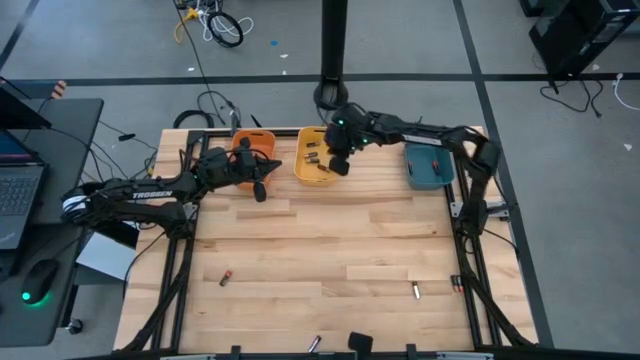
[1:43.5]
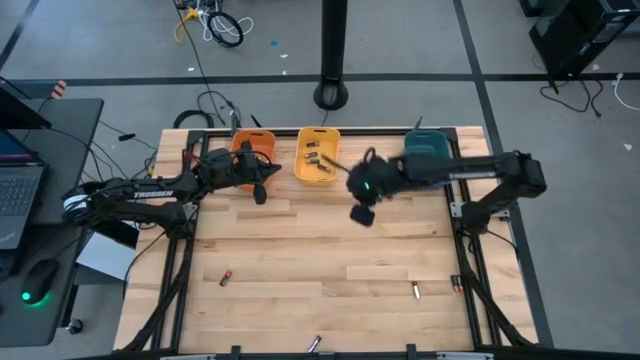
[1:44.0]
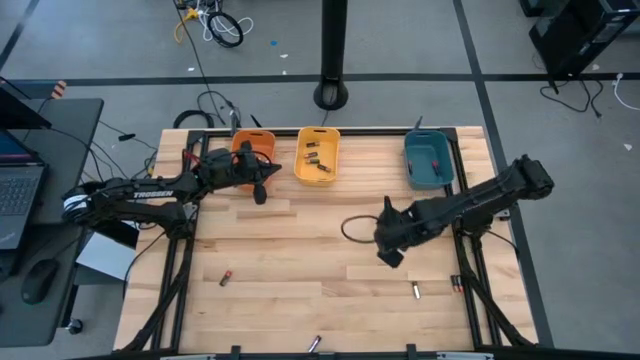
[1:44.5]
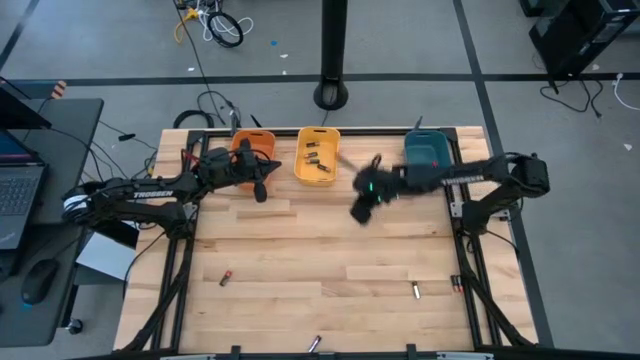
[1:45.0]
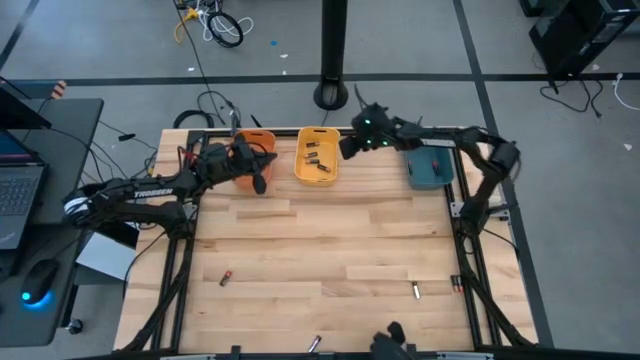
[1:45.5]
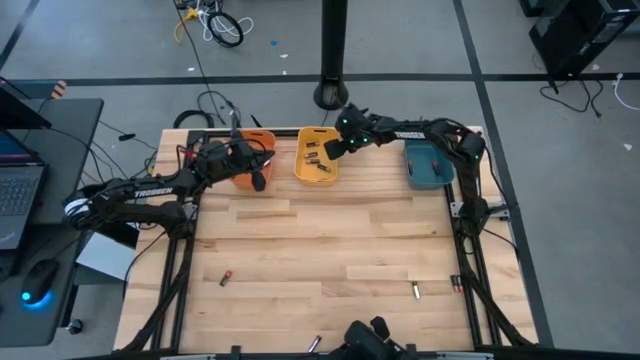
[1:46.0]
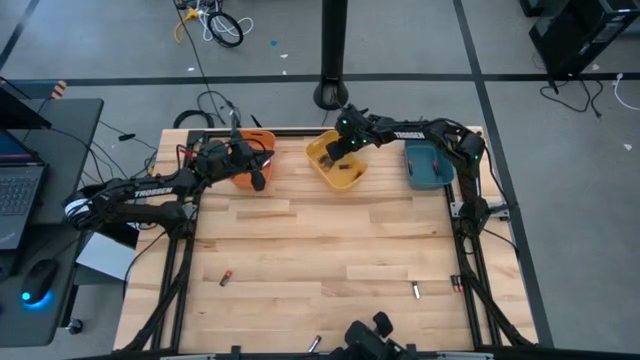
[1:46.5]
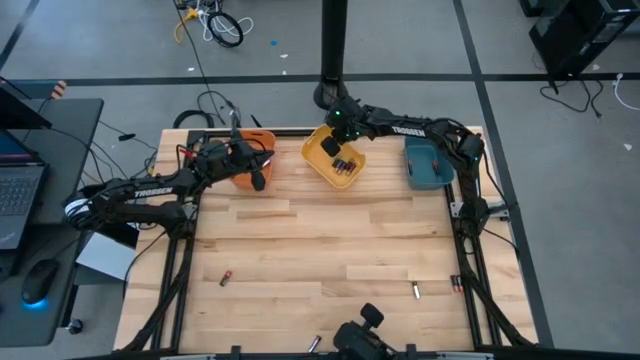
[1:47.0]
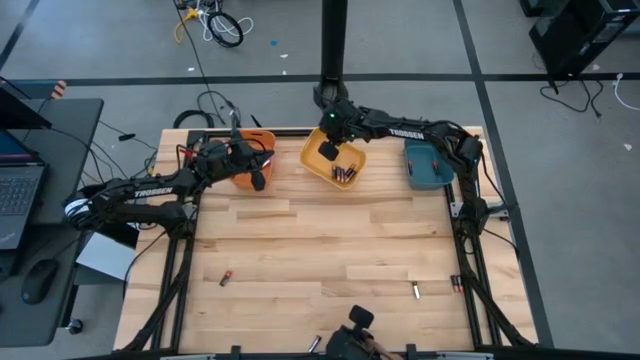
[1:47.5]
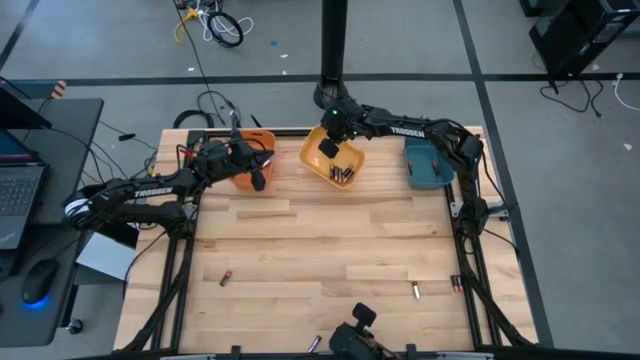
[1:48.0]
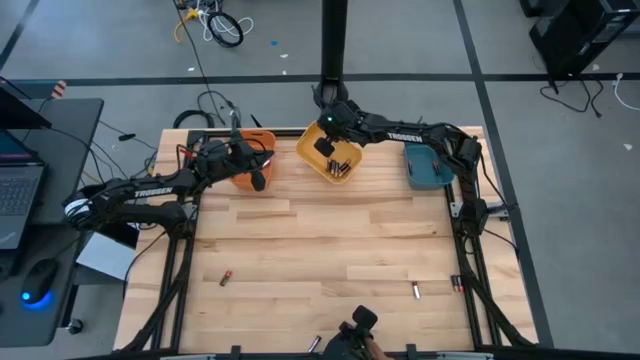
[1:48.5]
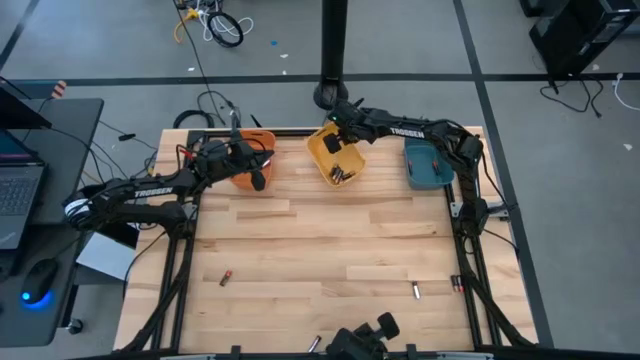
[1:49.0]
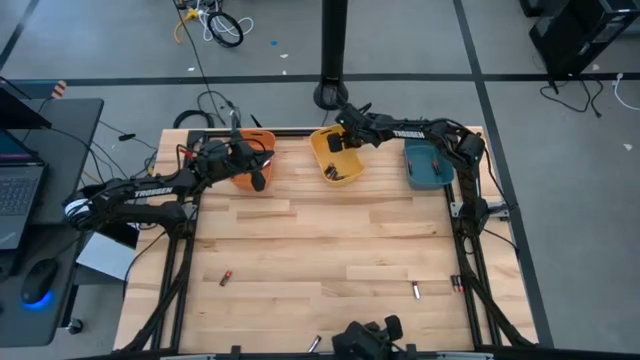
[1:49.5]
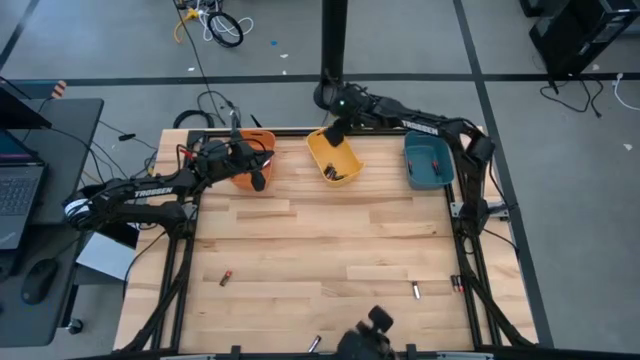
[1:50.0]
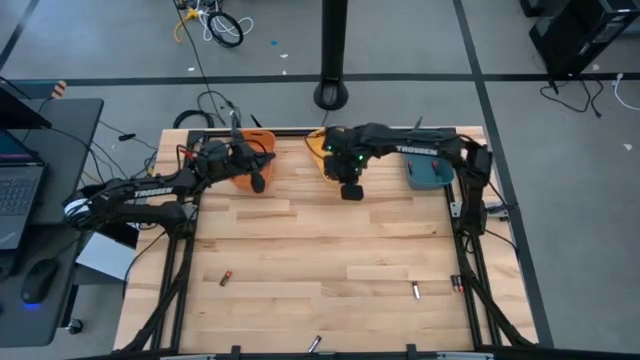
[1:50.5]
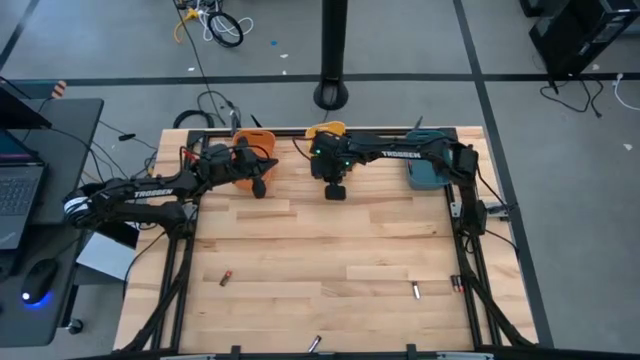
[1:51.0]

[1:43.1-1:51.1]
Task: Sort batteries
Adjust the yellow bin

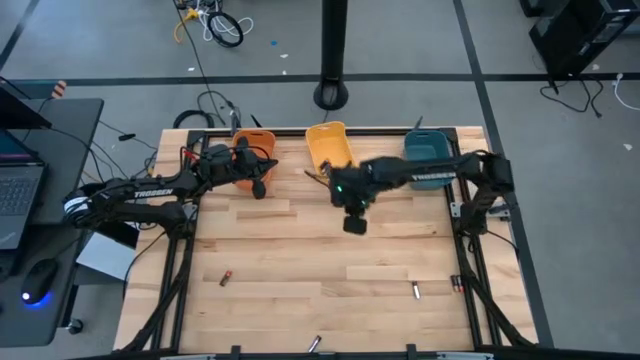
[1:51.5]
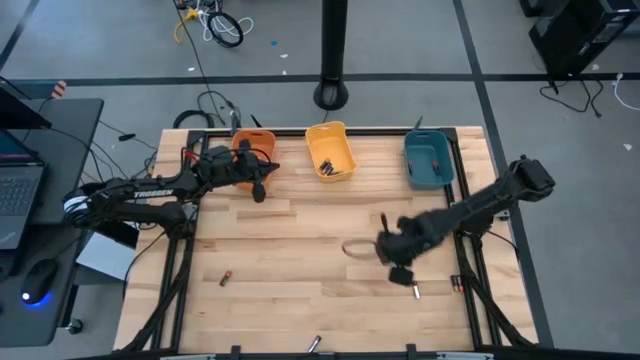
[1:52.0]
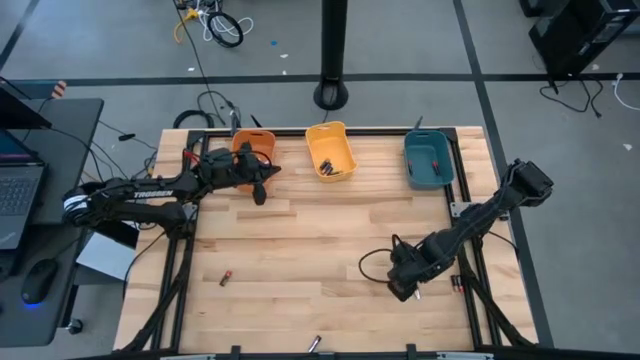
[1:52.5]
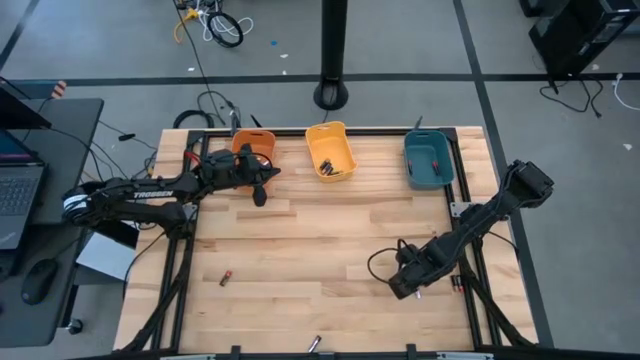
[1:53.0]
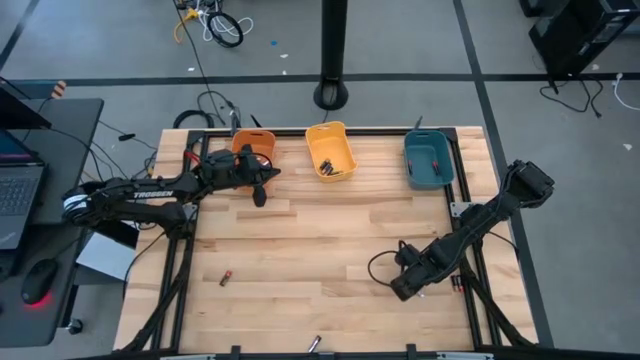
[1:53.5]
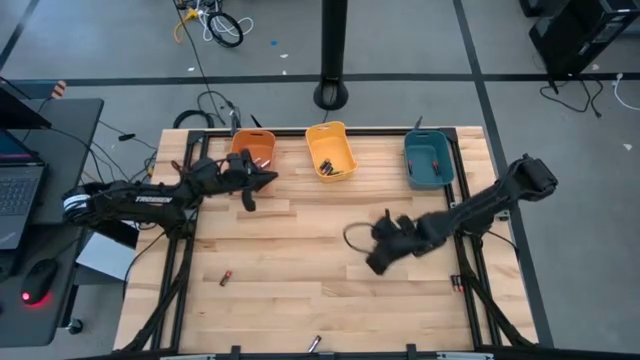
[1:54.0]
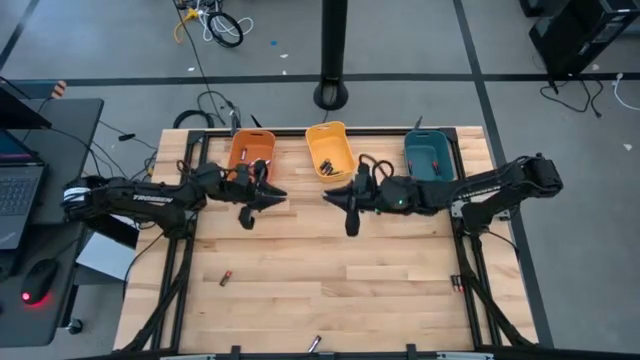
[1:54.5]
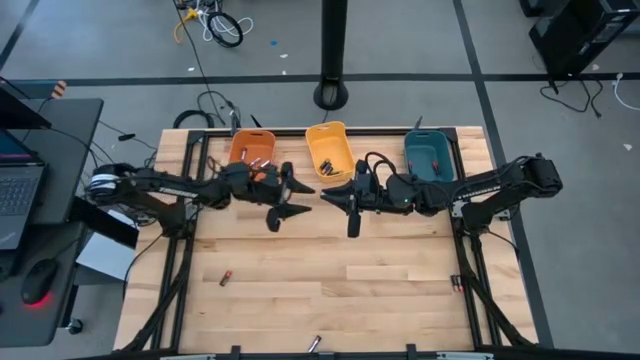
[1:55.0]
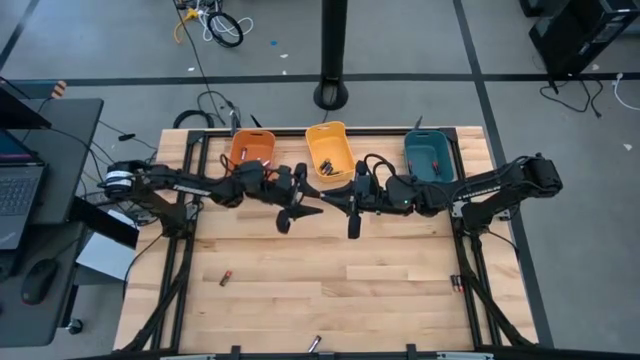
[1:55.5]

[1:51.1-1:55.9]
Put the silver battery into the orange bin

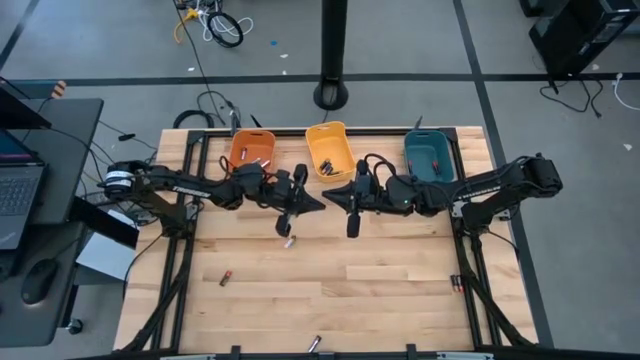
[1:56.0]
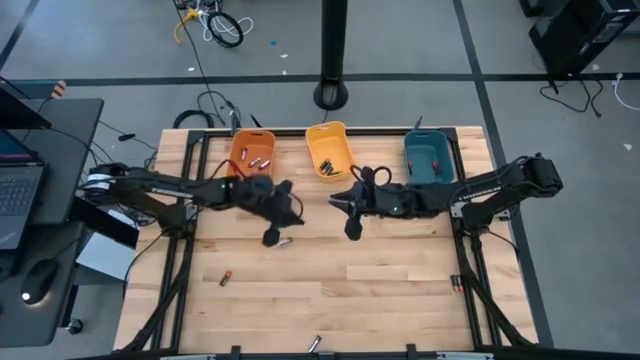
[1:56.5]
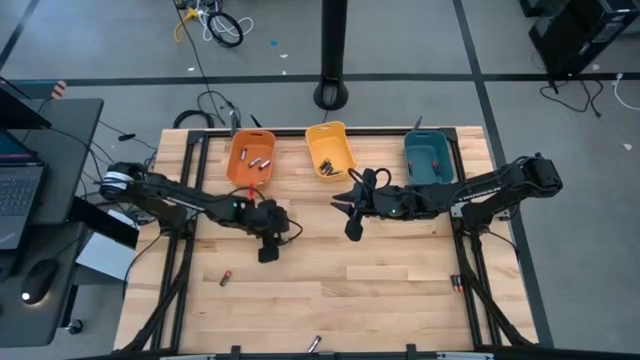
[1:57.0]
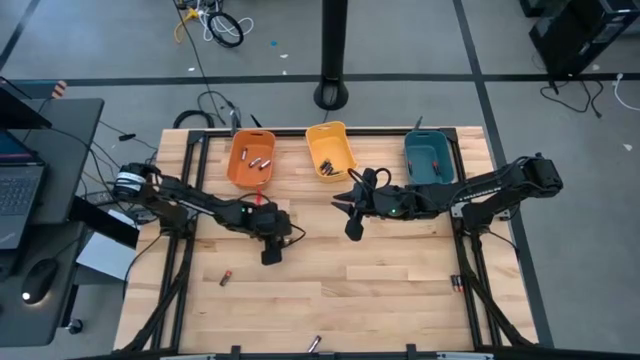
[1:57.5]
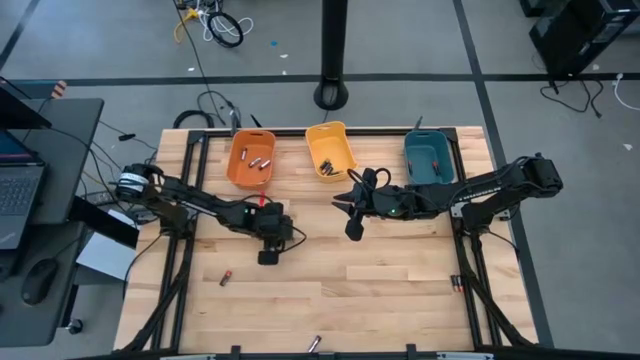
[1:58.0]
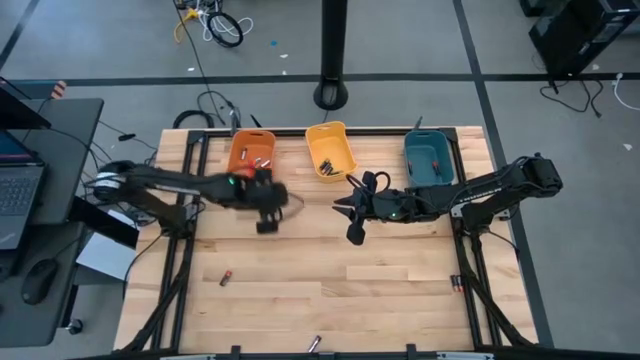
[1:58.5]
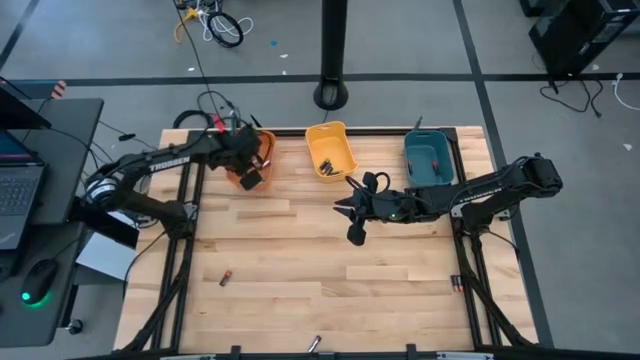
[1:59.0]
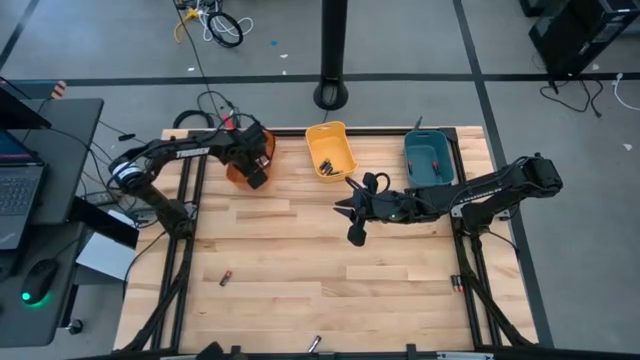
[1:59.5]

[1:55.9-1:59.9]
Put the silver battery into the orange bin

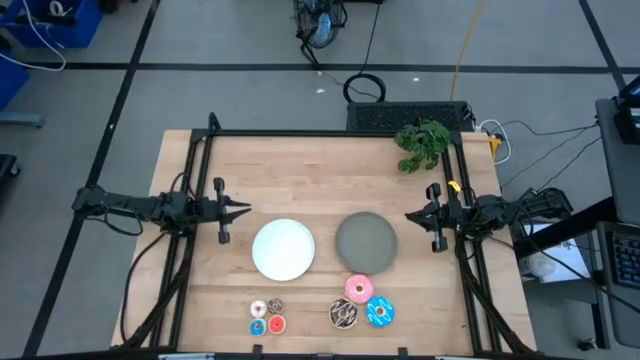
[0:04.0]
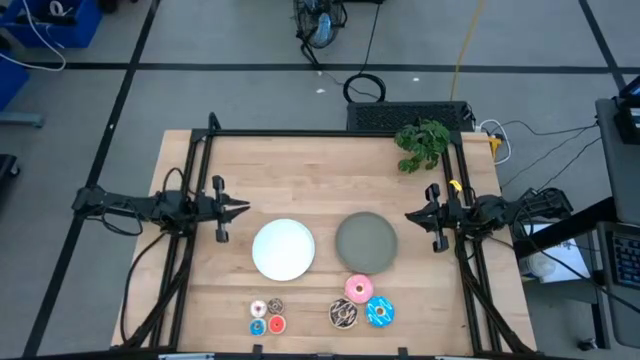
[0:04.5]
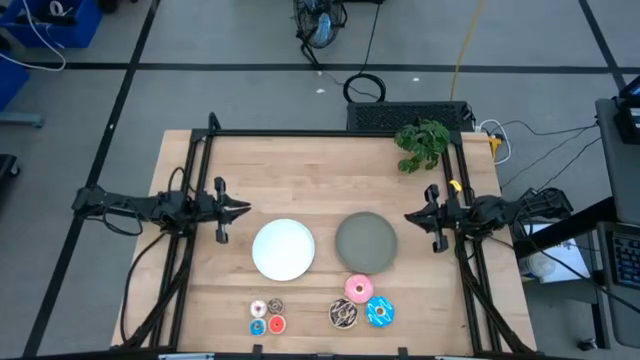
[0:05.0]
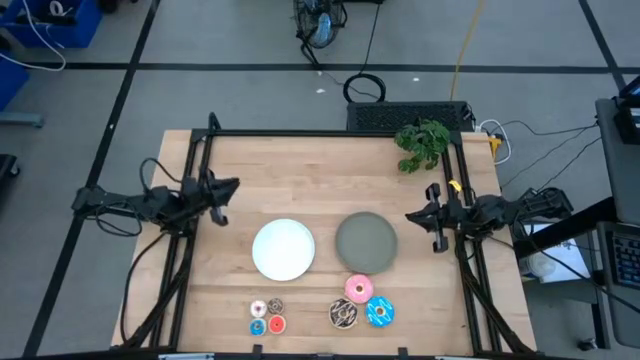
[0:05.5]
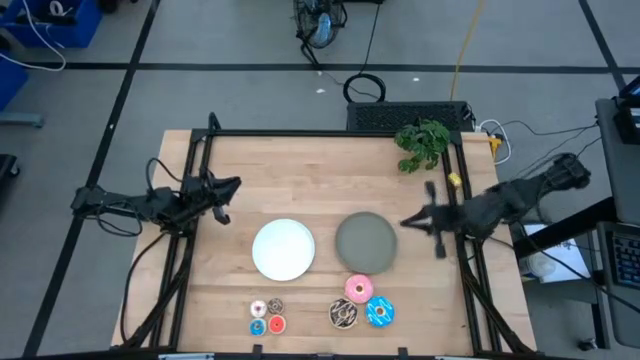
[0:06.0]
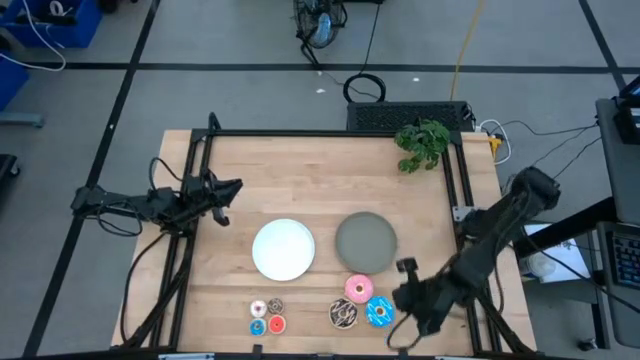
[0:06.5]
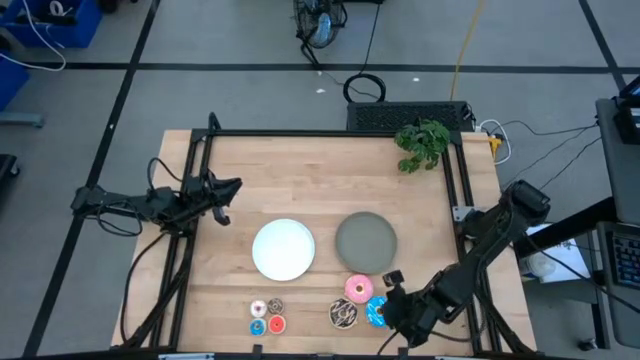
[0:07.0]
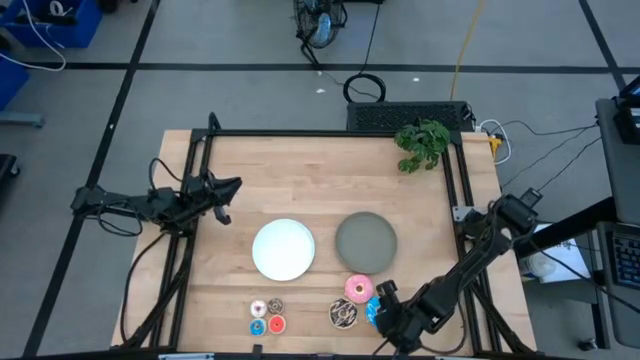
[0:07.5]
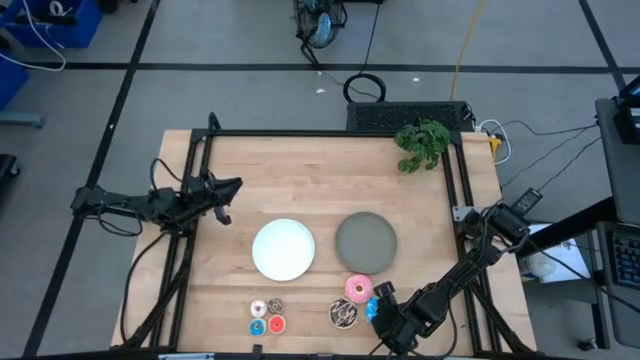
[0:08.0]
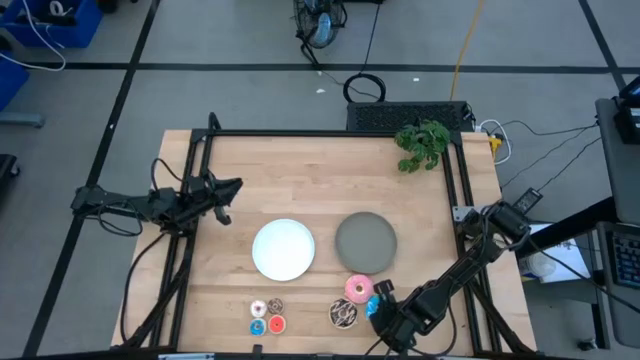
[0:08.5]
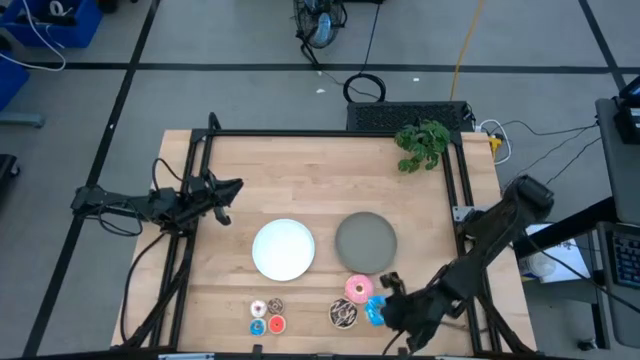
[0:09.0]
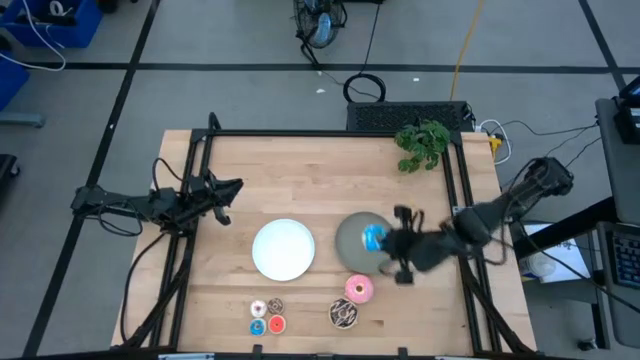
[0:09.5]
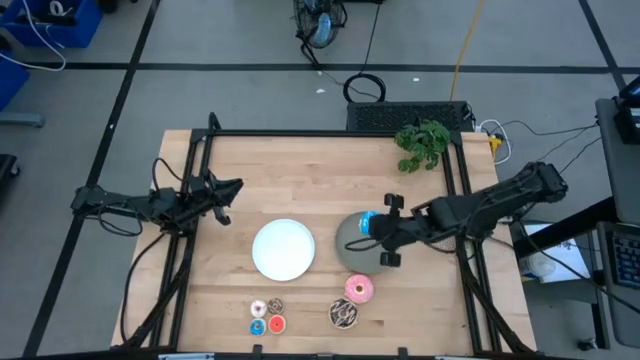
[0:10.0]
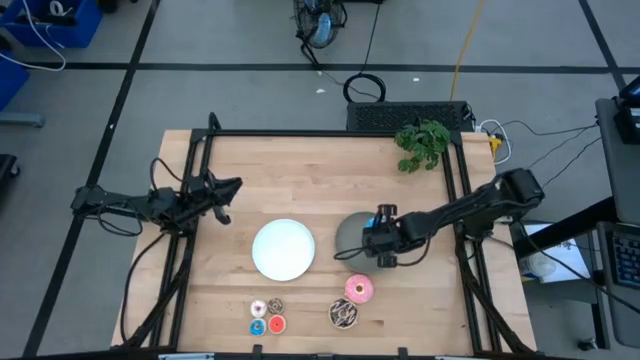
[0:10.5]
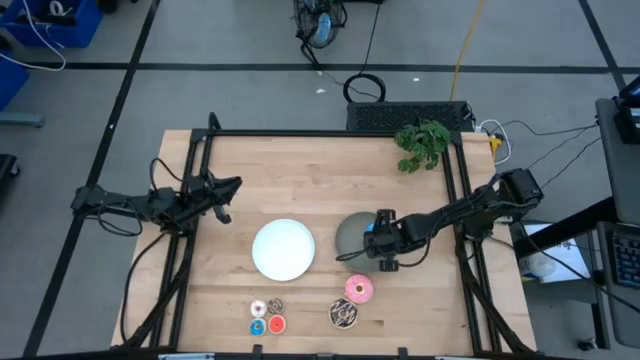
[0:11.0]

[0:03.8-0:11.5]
Task: Pick & Place donuts
Put the large blue donut on the gray plate
